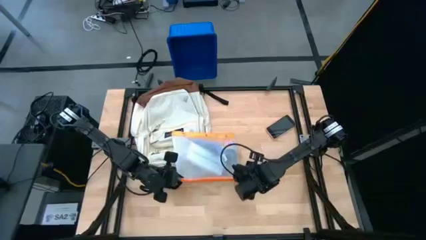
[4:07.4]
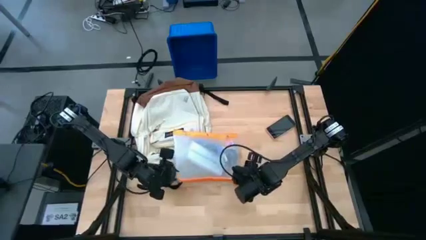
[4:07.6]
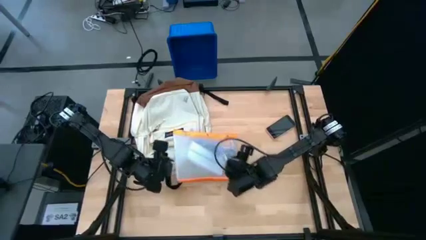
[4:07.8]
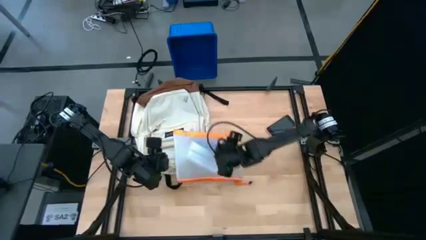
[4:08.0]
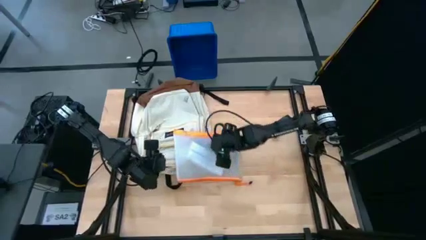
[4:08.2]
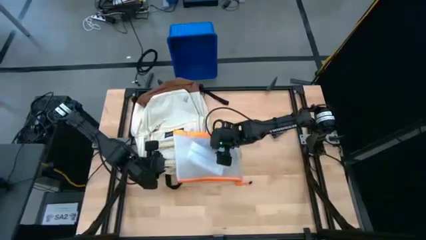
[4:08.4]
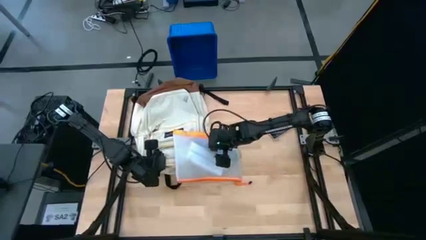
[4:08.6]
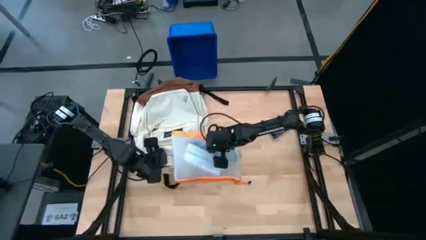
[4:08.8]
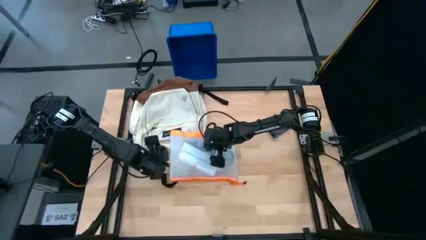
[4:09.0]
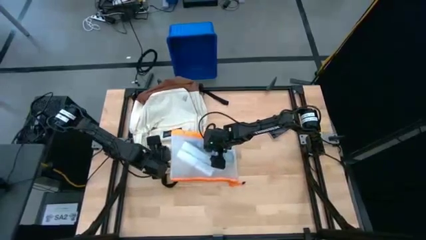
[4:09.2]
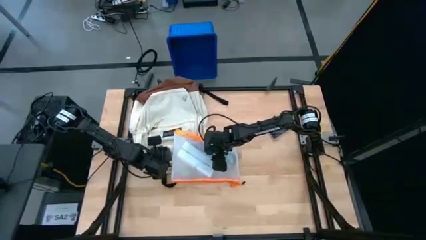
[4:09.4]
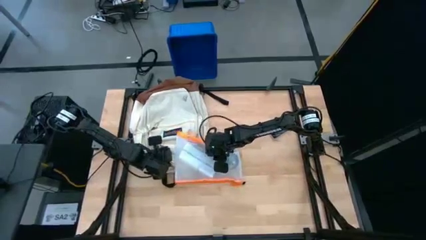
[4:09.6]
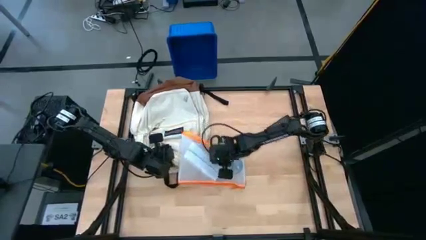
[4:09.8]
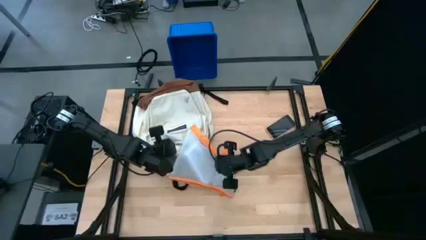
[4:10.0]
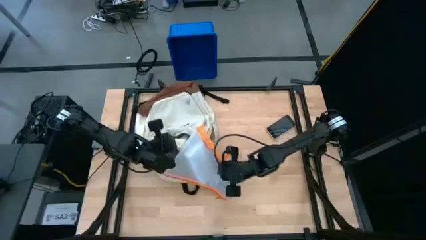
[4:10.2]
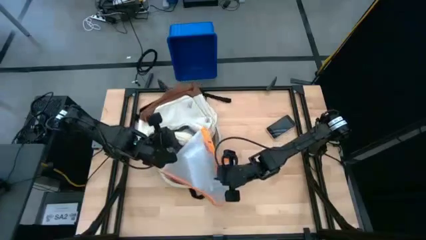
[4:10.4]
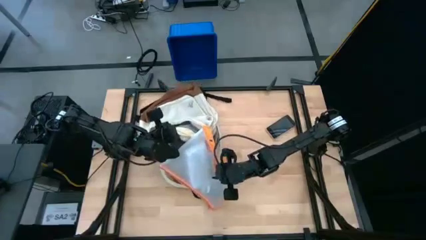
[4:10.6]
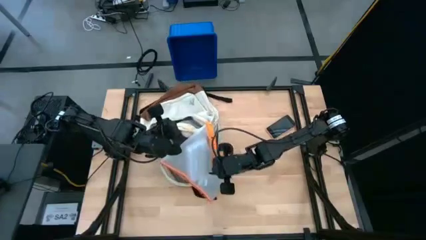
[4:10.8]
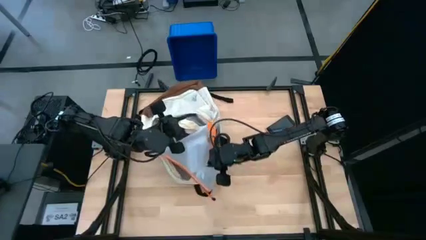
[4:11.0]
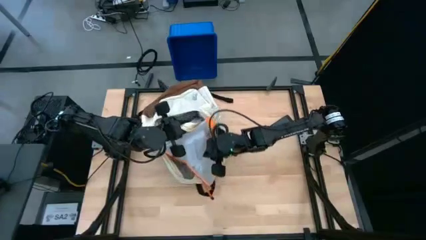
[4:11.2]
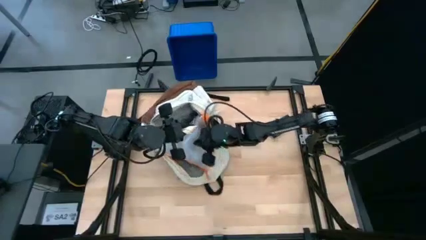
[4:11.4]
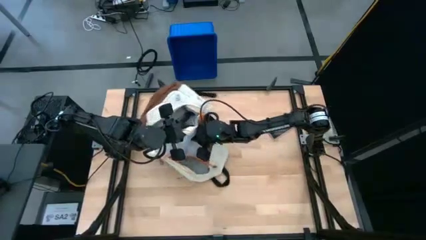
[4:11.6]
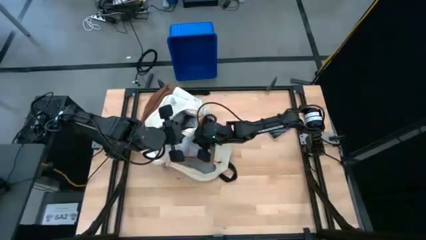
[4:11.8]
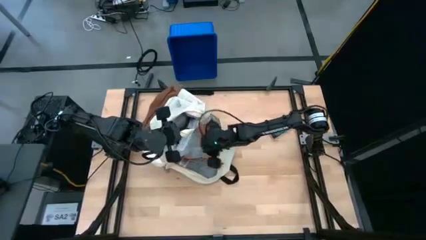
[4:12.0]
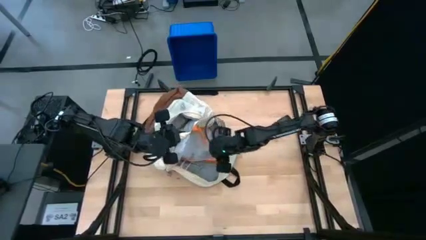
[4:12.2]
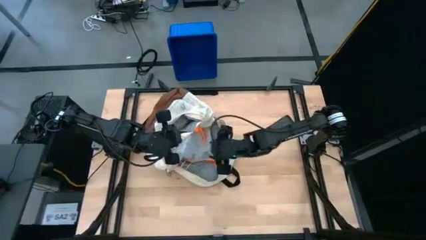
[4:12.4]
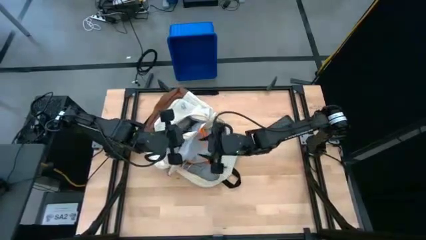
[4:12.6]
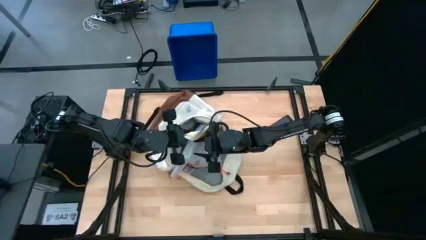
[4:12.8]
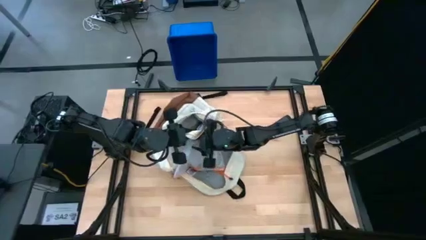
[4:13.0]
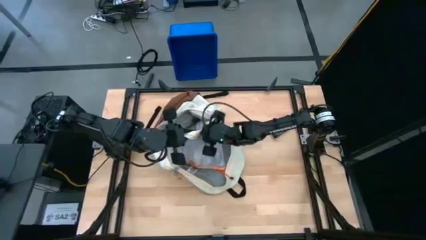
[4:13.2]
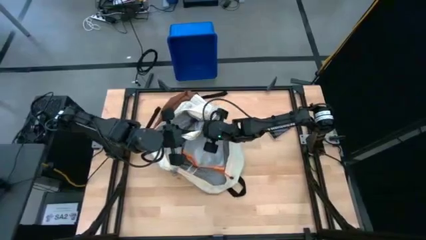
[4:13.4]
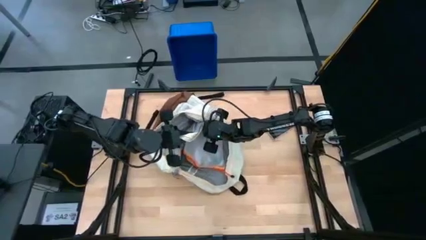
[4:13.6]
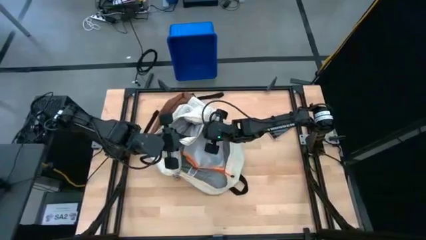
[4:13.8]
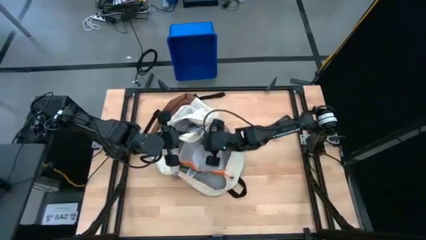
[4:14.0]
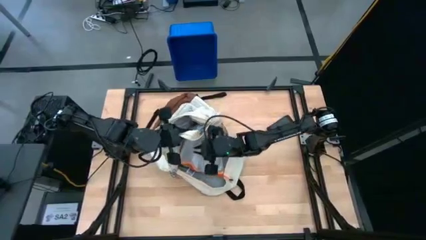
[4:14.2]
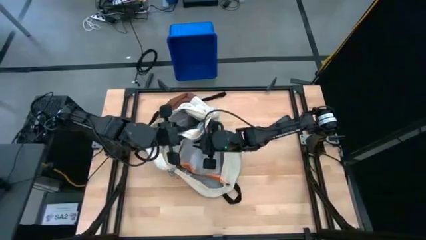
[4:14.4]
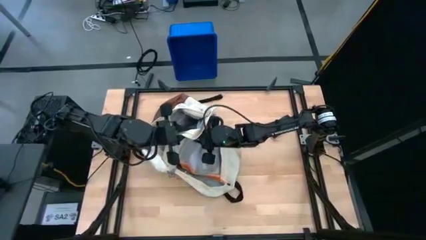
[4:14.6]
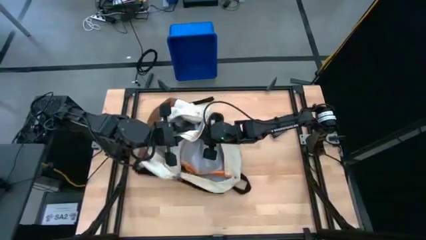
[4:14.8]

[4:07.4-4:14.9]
Task: Unpack backpack
Put the zip bag into the white backpack

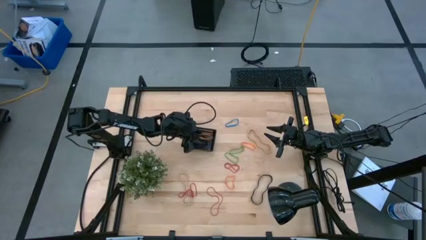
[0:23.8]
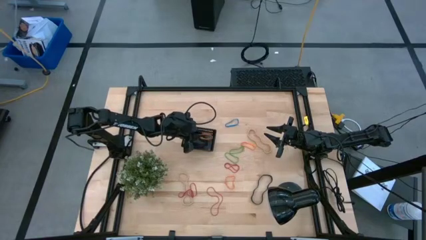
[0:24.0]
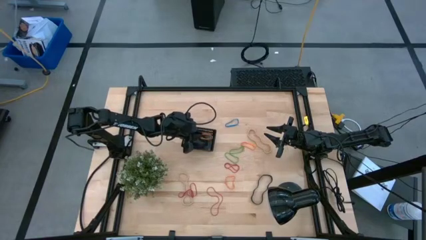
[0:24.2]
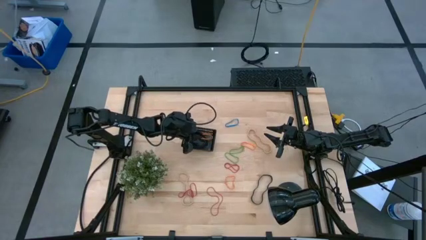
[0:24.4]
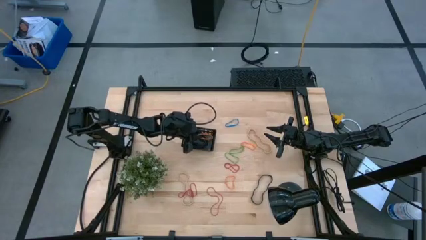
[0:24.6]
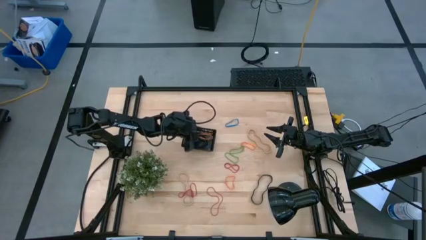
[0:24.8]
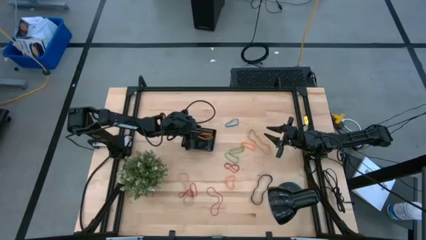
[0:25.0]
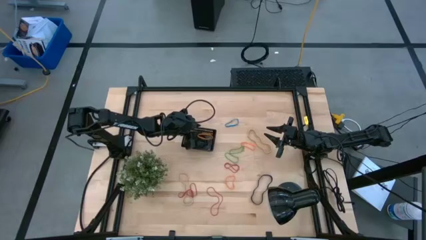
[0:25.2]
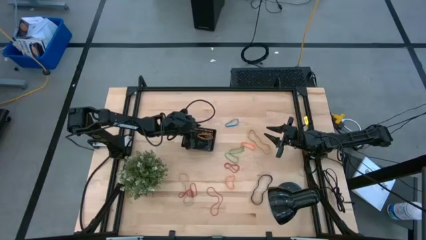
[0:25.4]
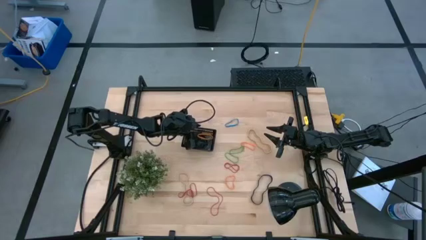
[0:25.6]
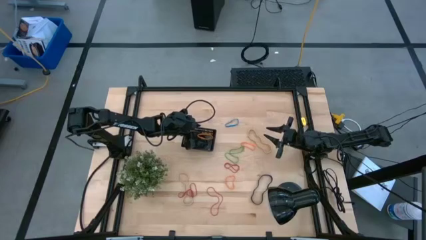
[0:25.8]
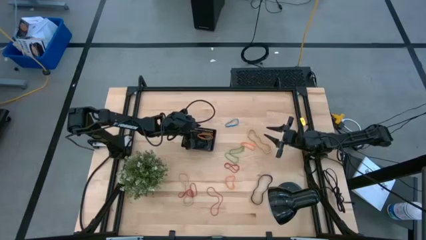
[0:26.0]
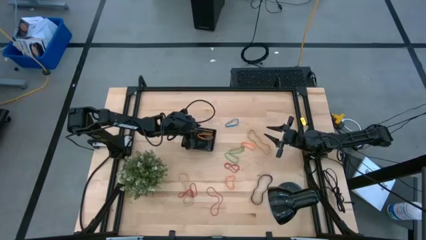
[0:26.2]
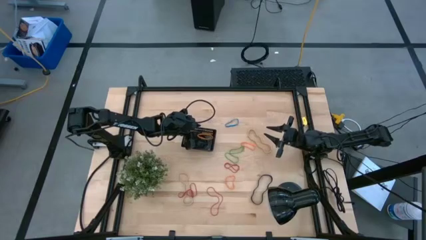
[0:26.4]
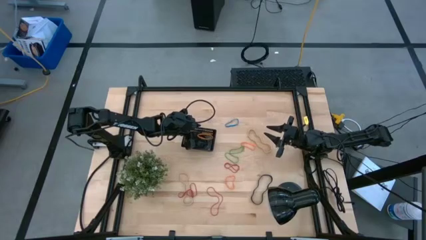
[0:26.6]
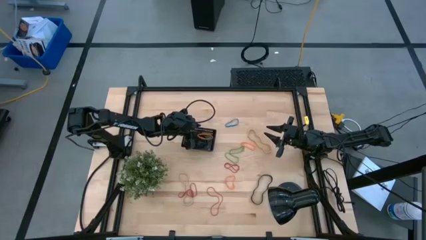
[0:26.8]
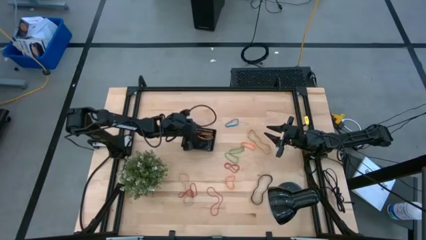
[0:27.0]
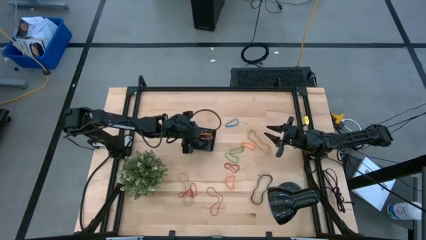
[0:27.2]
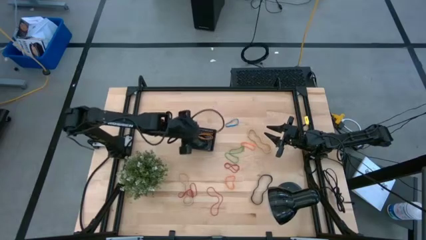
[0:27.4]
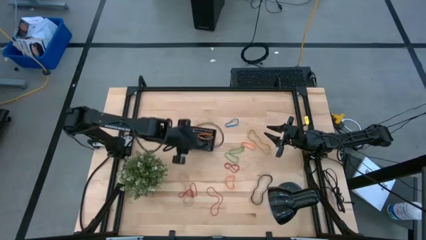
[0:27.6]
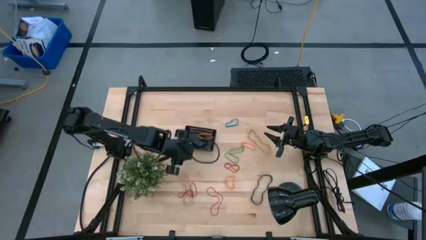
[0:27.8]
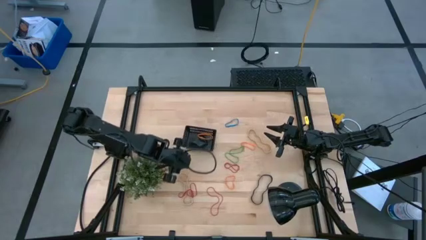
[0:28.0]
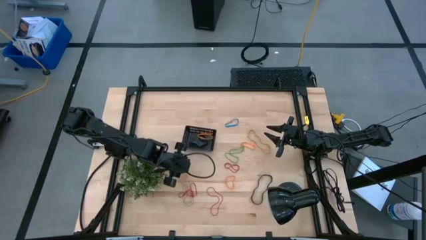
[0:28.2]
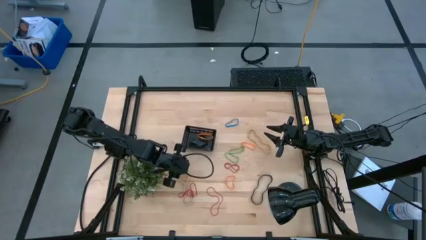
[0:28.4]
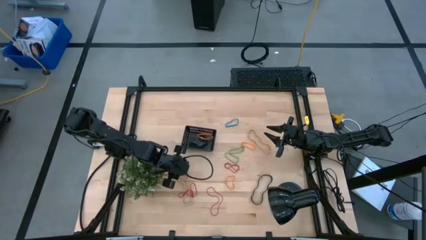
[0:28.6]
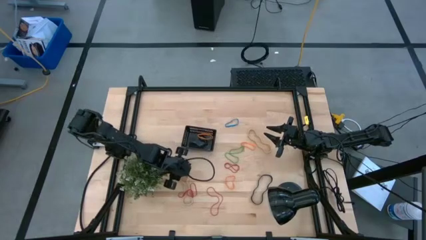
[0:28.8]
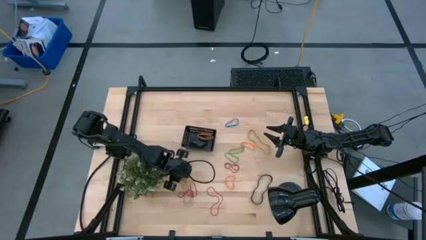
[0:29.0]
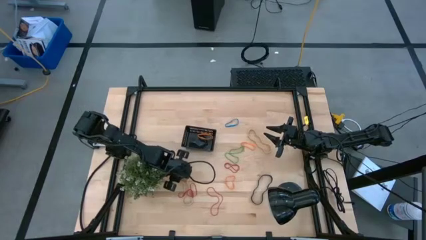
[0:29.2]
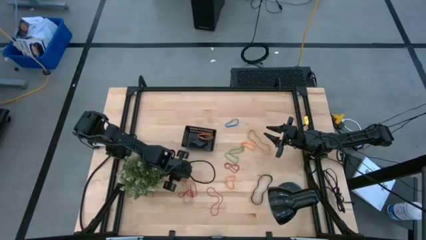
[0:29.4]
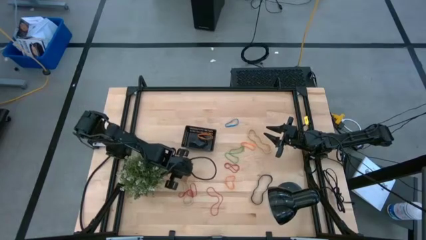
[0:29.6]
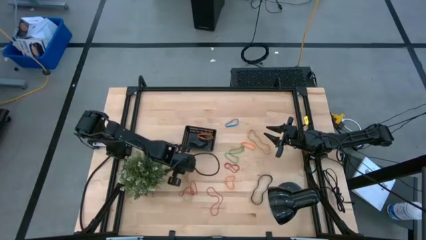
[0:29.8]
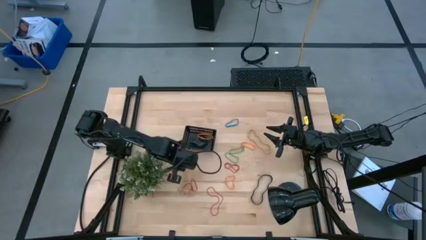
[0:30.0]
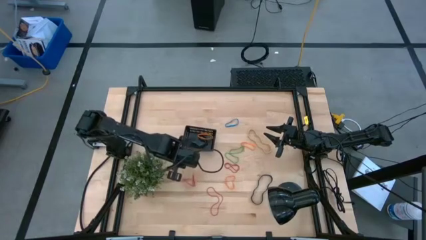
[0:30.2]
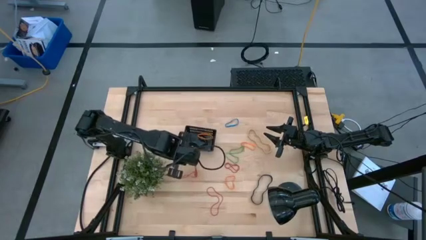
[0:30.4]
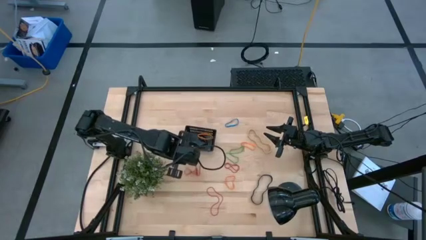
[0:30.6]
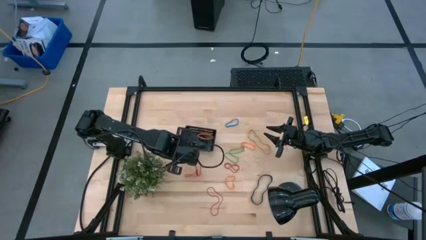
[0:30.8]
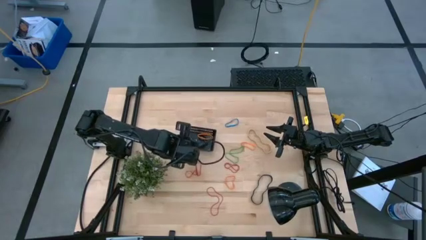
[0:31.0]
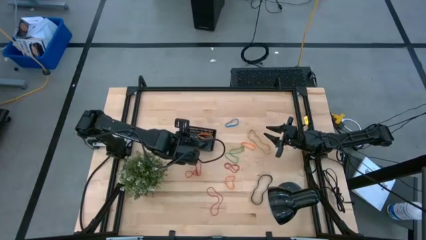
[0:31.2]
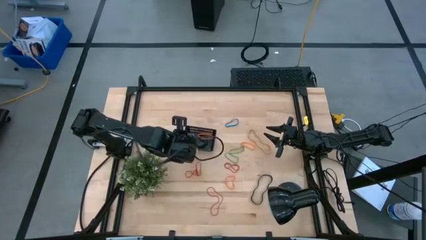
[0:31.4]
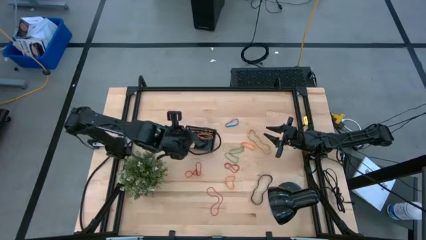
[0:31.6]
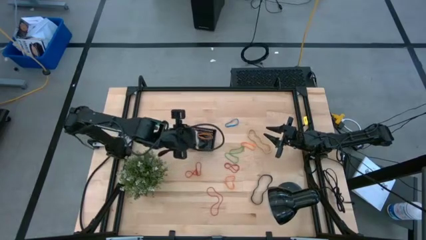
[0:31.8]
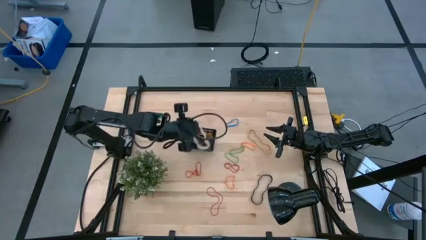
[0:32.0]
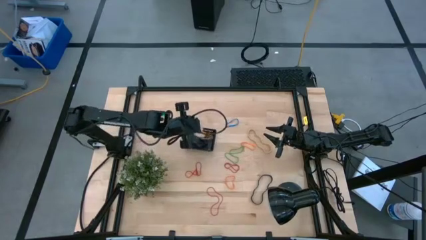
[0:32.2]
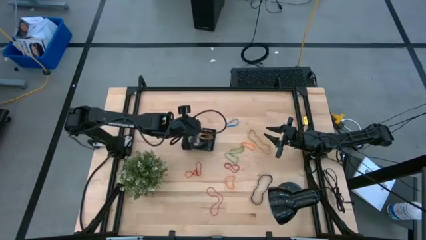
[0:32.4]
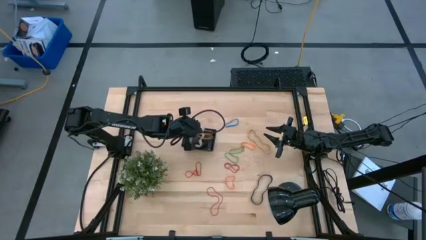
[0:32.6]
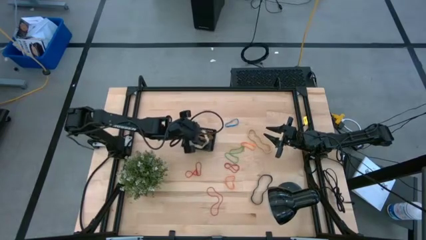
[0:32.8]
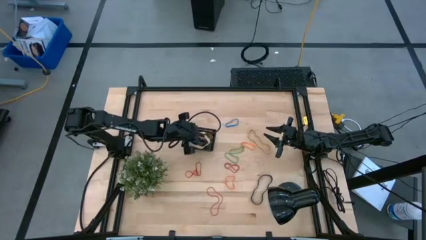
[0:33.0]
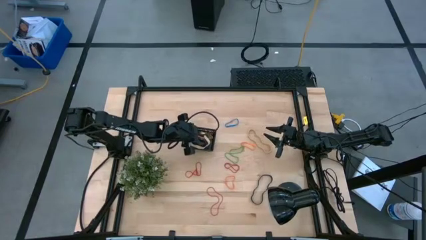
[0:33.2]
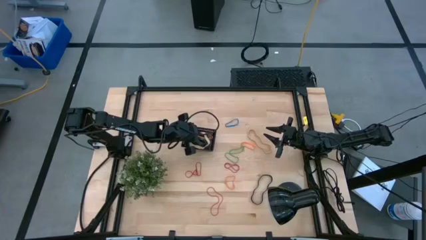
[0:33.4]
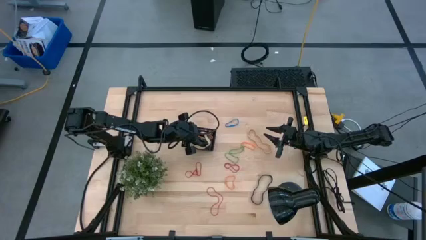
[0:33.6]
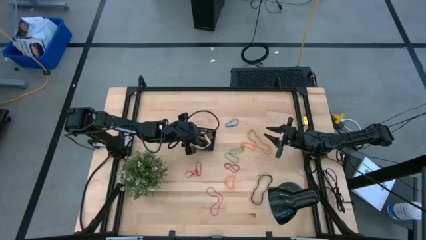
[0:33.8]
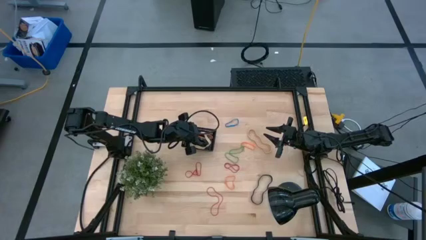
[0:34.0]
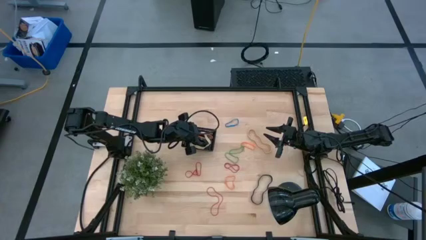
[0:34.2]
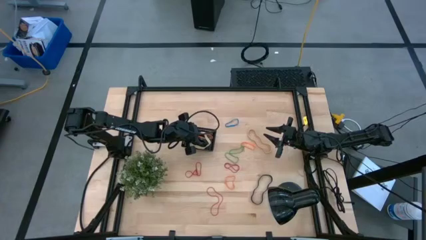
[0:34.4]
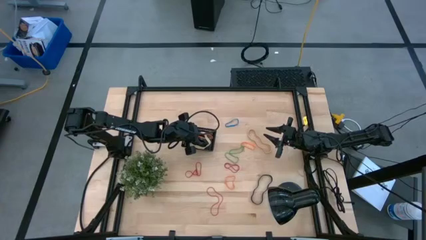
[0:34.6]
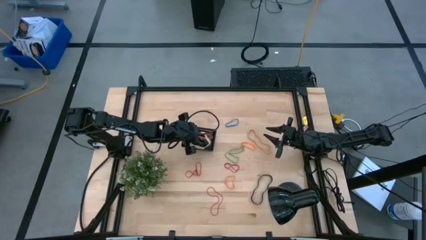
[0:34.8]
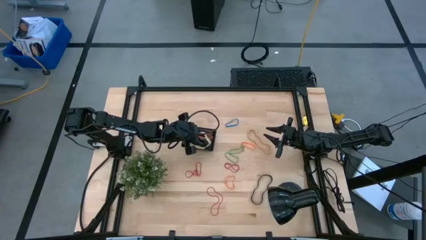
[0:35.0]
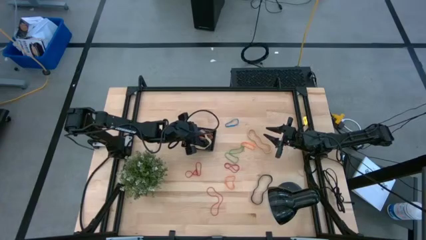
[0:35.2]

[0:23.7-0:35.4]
Task: Pick and place rubber bands into bin
Put the bottom white rubber band into the black bin
